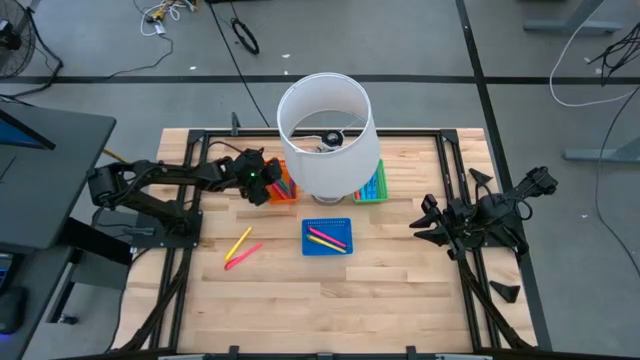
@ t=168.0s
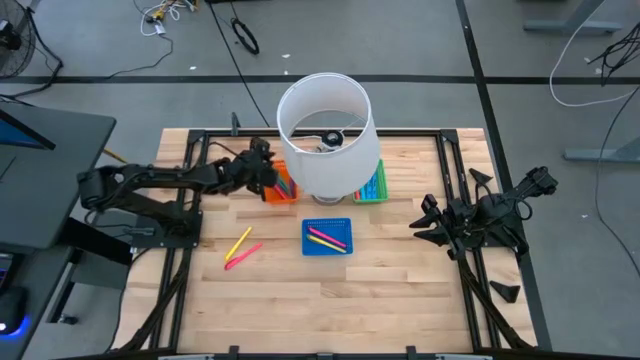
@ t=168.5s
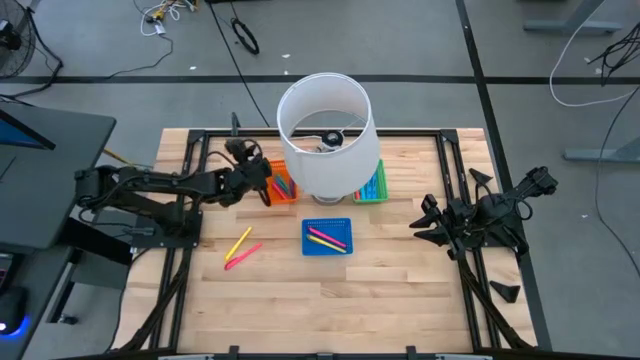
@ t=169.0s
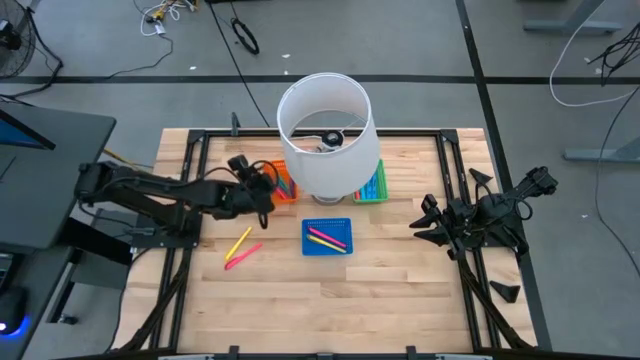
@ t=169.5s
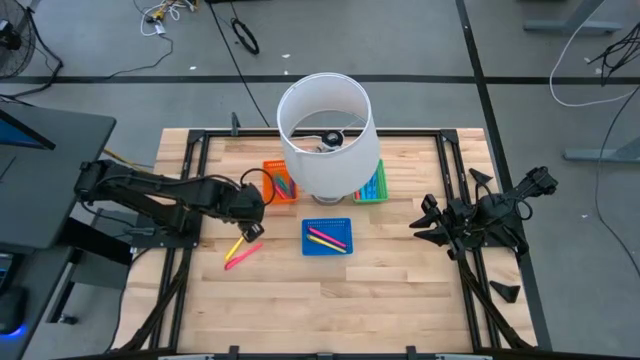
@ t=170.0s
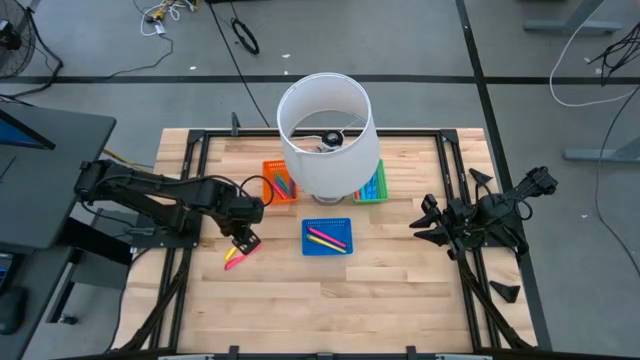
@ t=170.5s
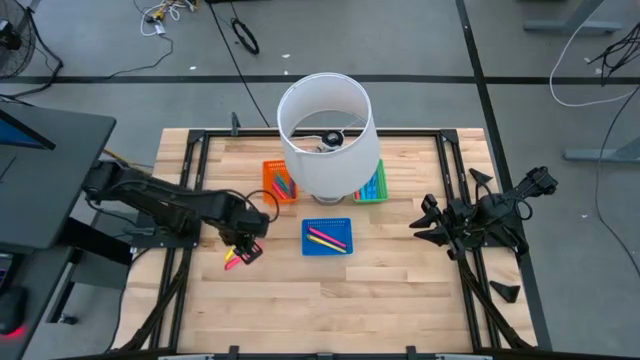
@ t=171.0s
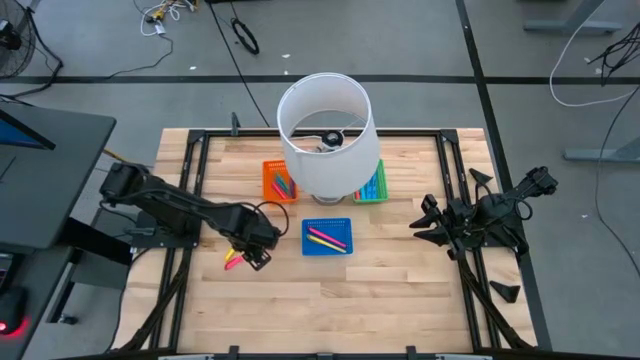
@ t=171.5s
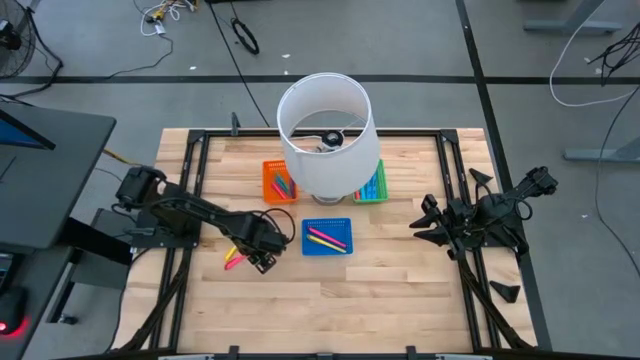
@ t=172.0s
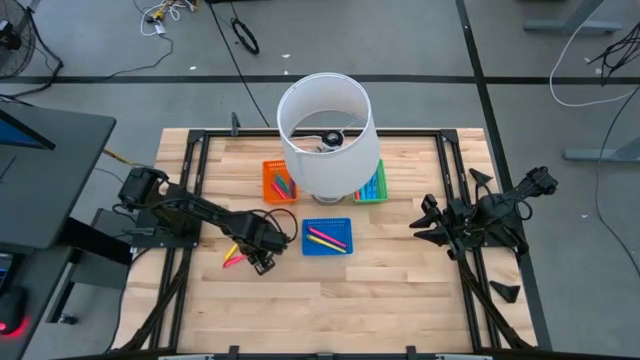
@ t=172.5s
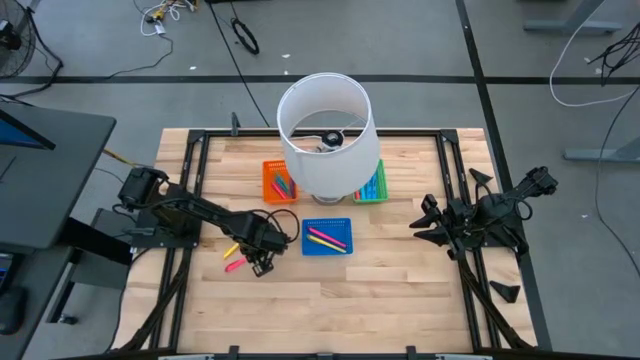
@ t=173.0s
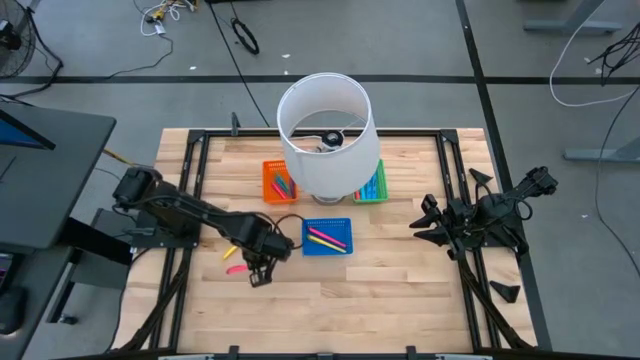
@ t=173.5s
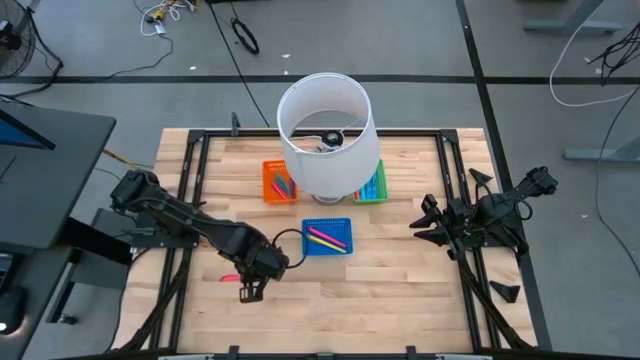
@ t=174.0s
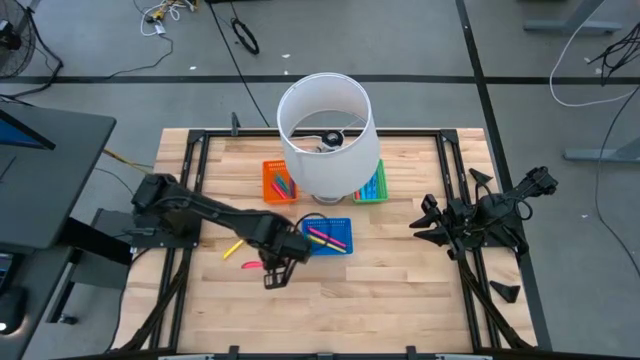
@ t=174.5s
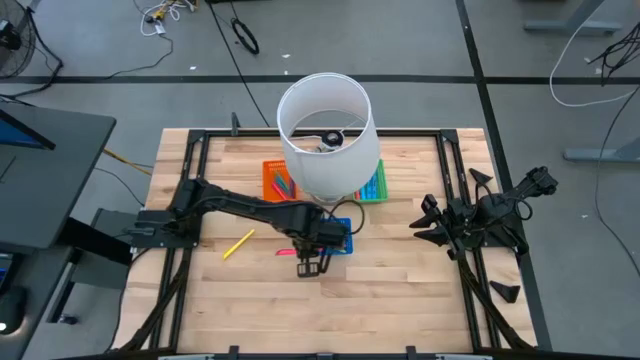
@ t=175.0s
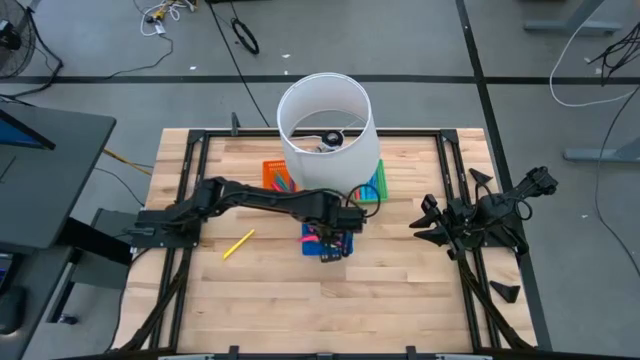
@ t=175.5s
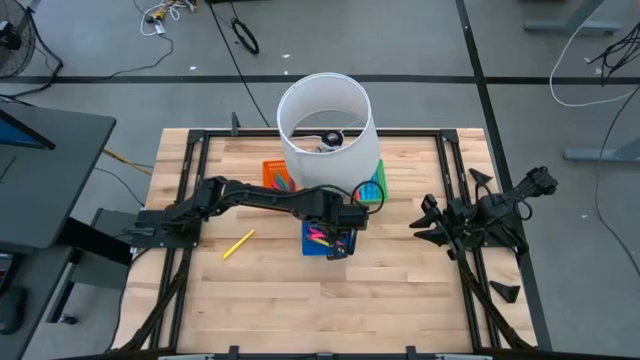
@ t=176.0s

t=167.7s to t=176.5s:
Task: Pick & Place Markers
Put the pink pen into the blue bin

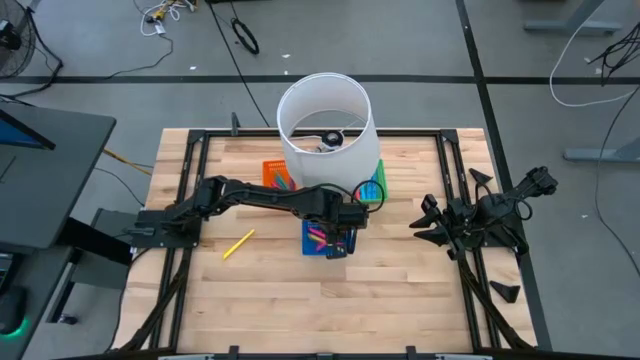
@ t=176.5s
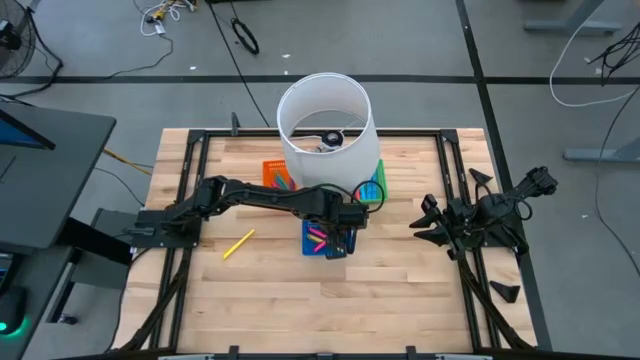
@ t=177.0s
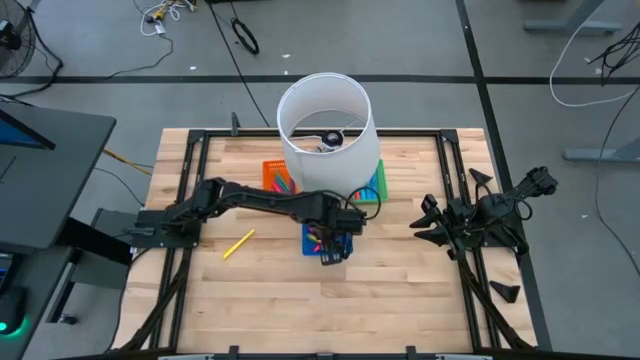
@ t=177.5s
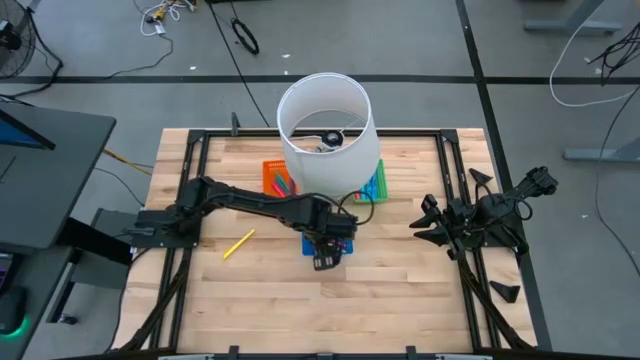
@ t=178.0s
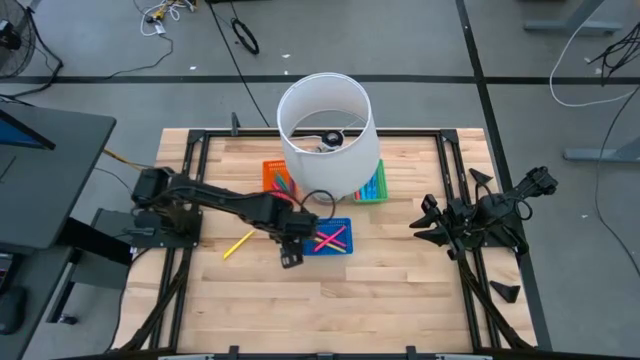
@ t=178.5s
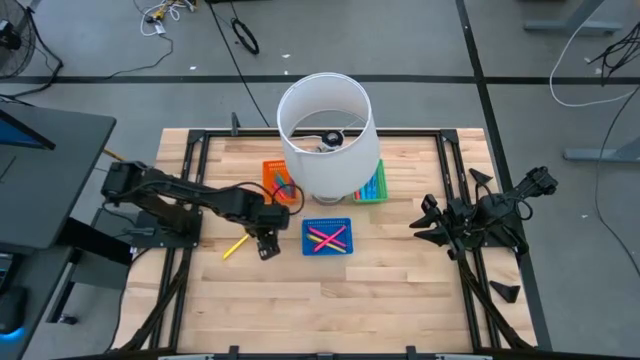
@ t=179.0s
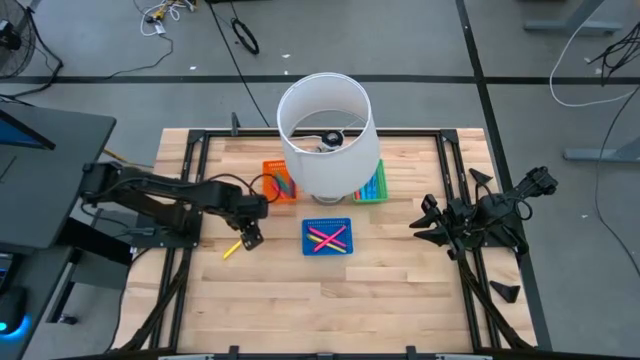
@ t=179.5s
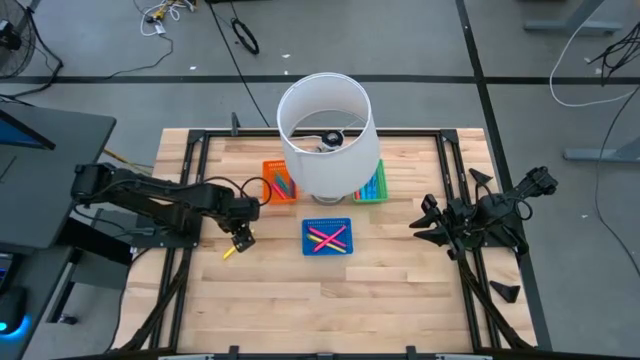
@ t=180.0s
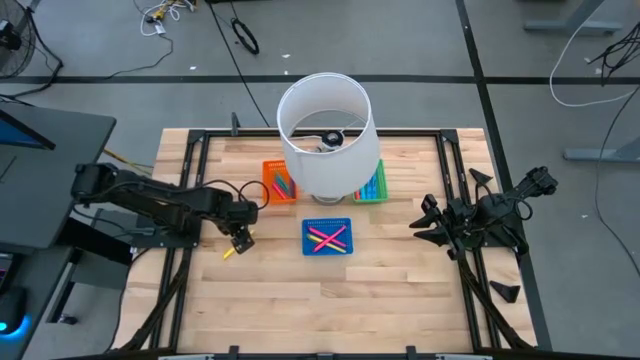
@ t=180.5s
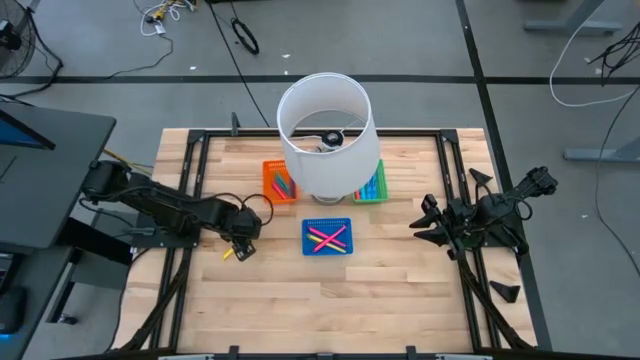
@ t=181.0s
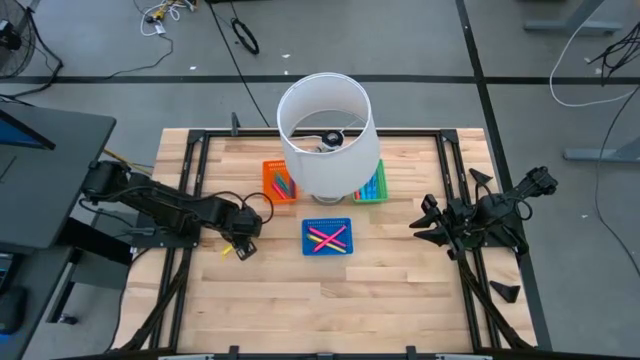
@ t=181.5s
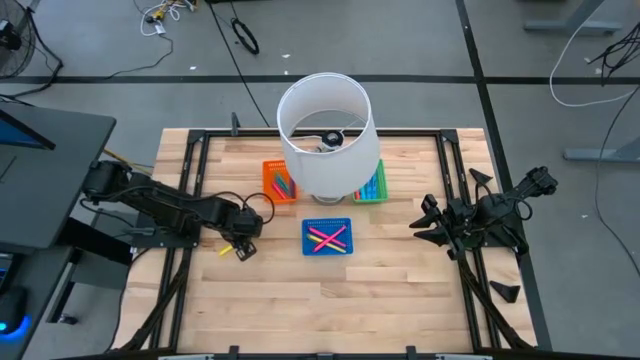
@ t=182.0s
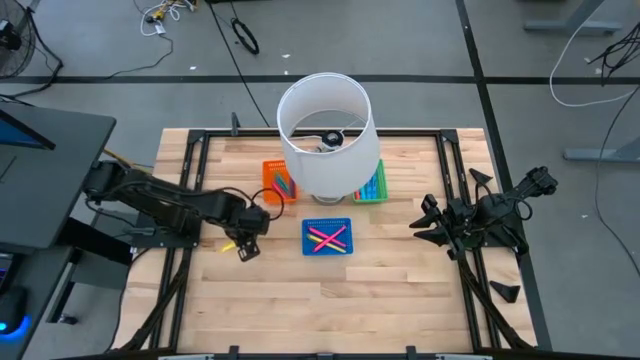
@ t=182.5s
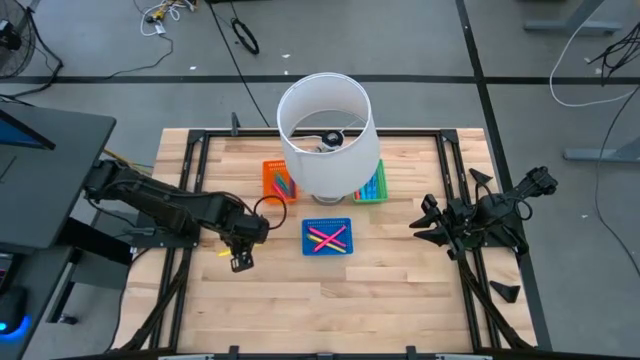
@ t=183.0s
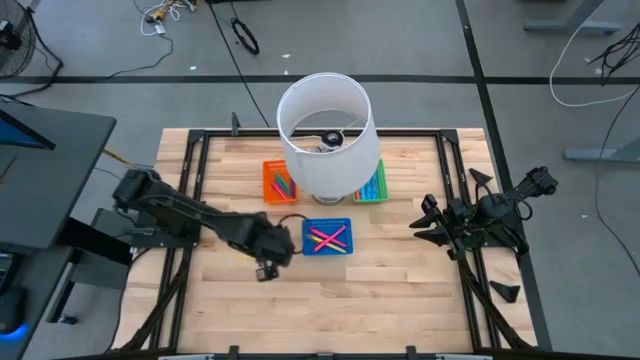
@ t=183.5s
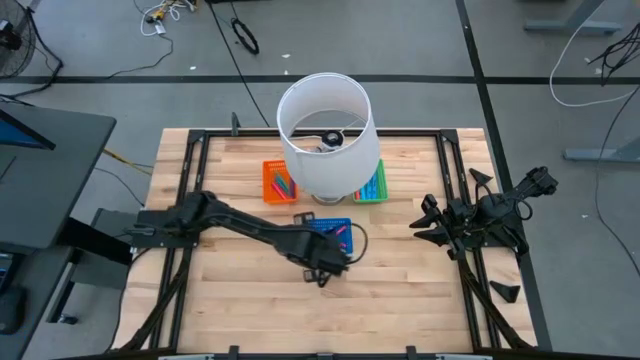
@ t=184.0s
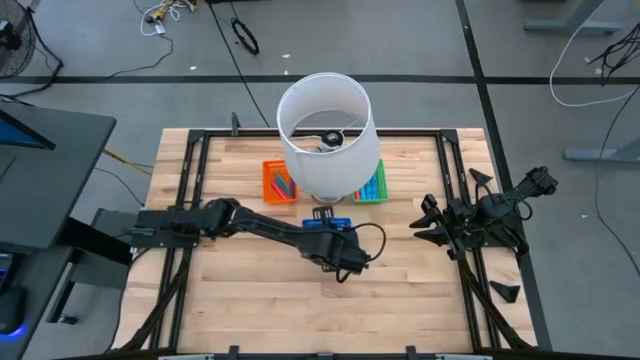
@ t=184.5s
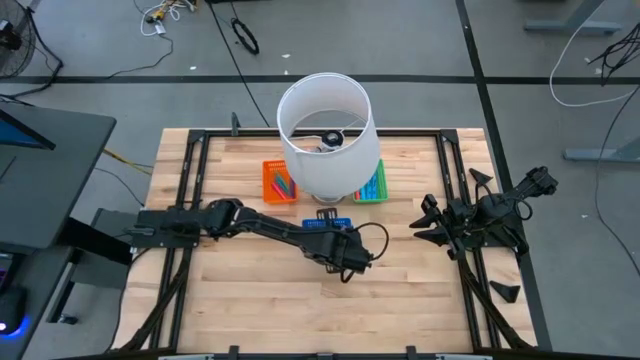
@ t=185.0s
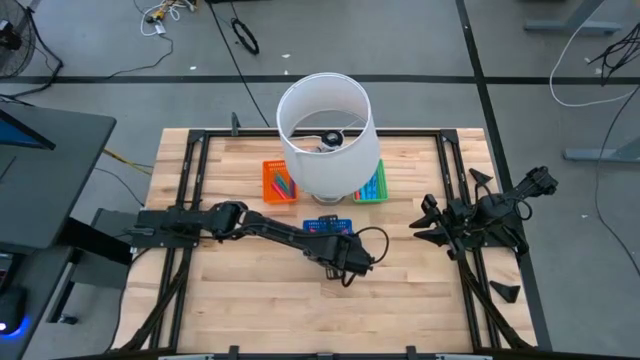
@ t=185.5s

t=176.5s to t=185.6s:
Put the yellow pen into the blue bin

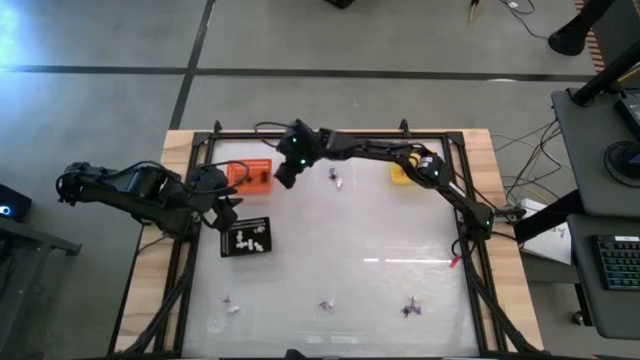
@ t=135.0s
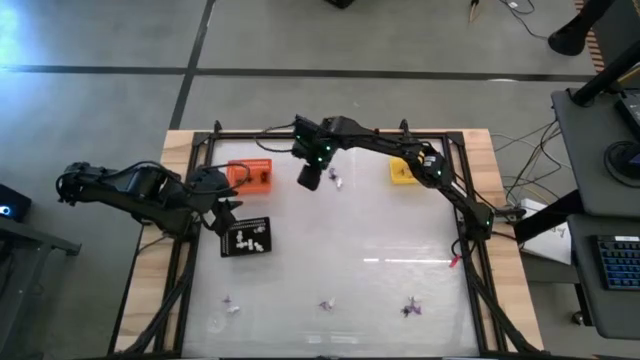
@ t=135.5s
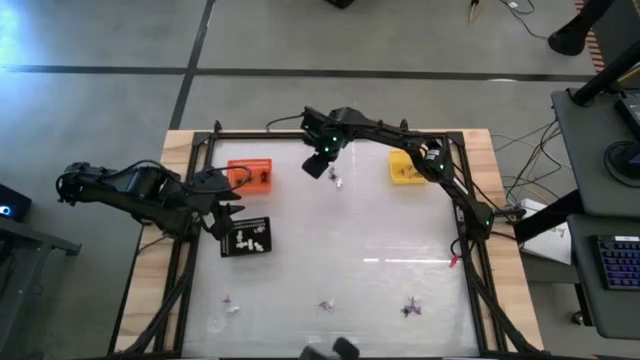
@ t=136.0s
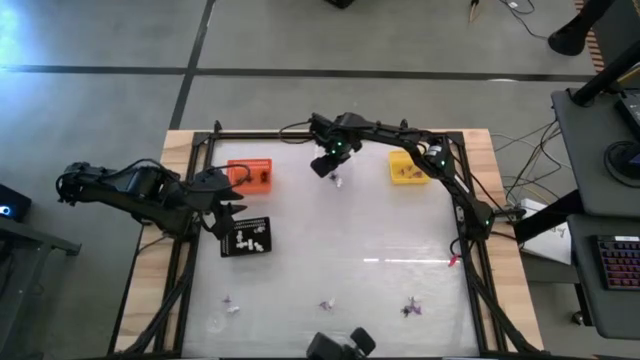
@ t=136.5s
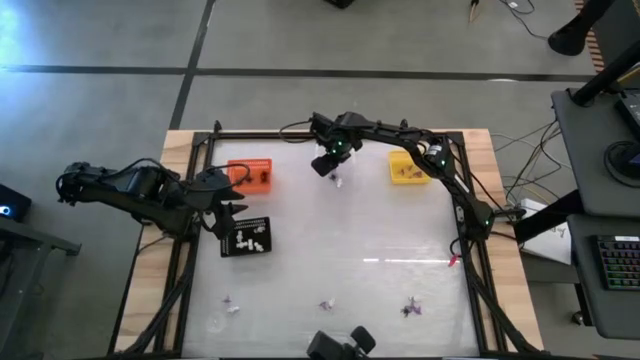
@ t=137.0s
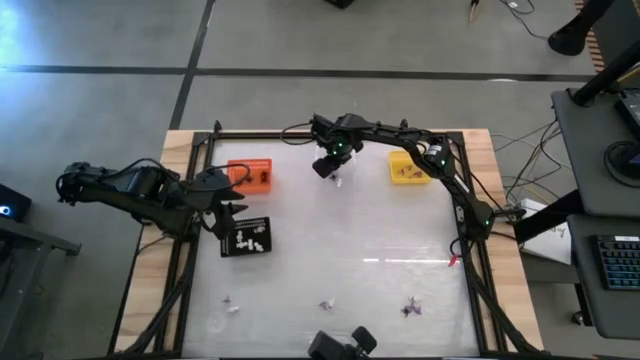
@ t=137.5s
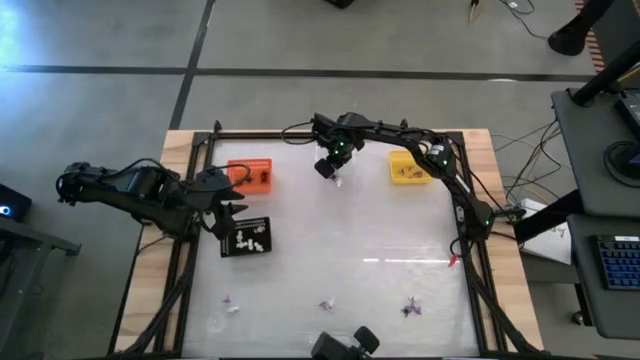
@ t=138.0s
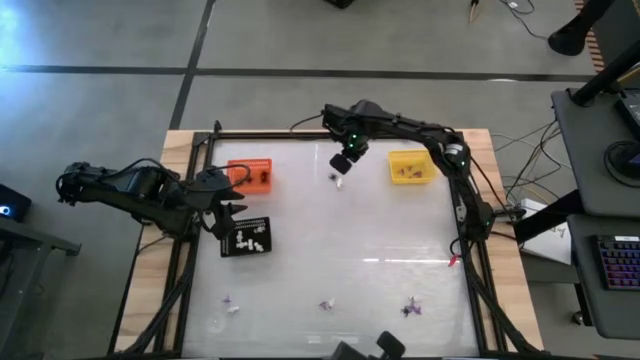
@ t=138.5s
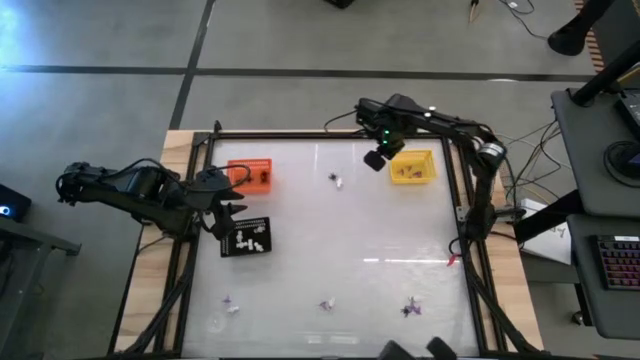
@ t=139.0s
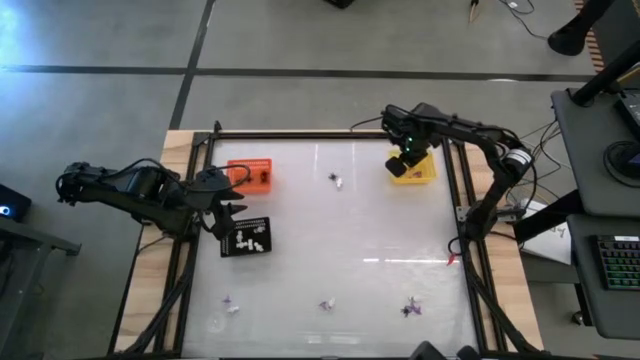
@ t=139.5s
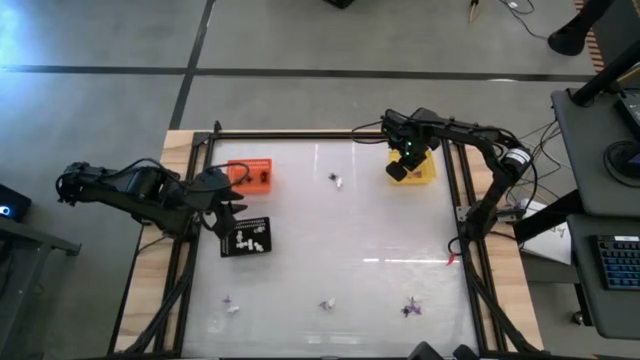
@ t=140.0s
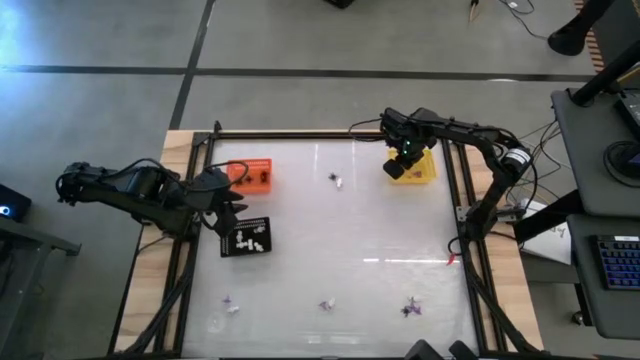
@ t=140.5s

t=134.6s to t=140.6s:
Task: Sort Halloween decoration
Put the purple witch hat toy into the yellow bin
